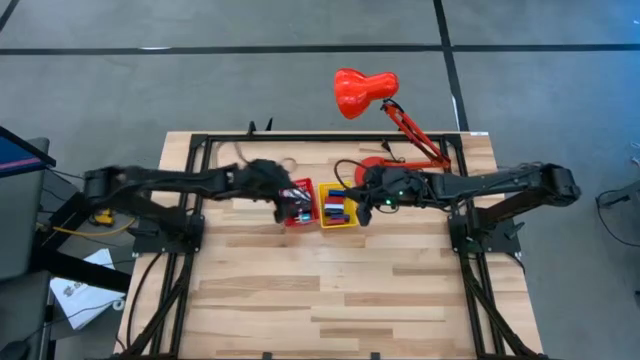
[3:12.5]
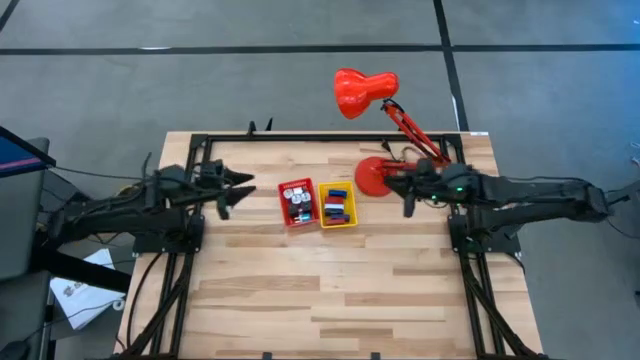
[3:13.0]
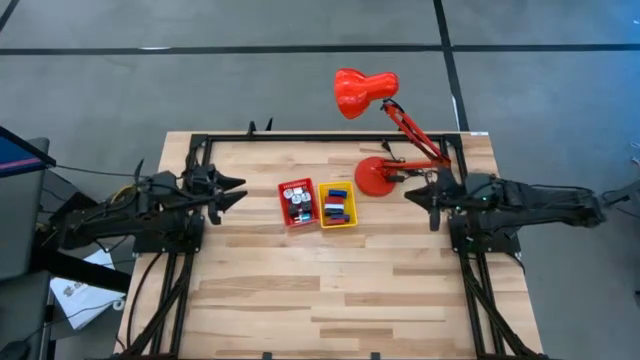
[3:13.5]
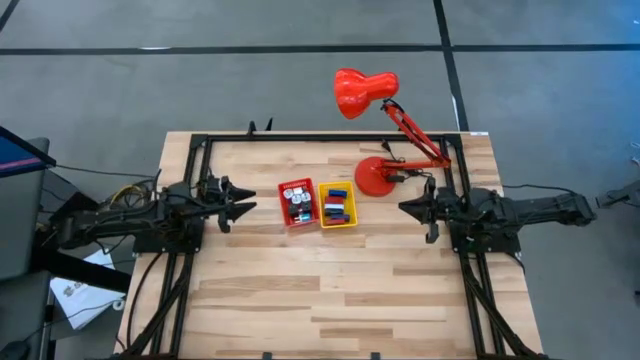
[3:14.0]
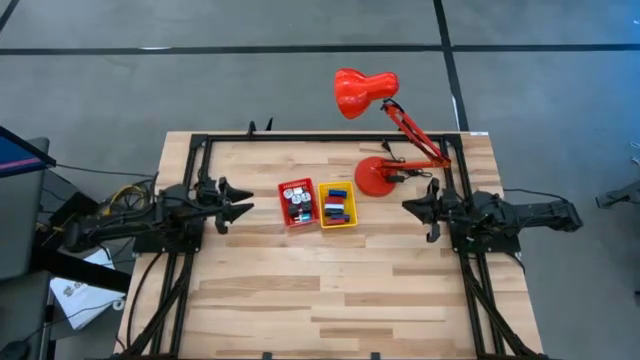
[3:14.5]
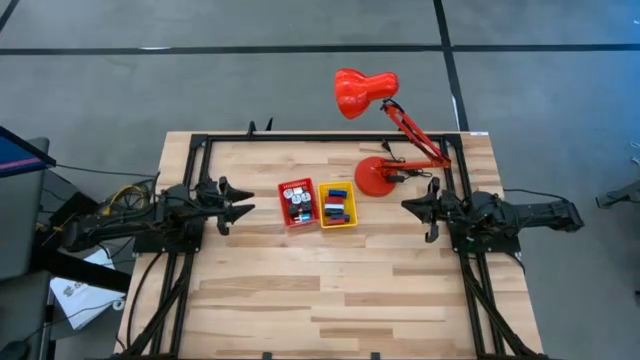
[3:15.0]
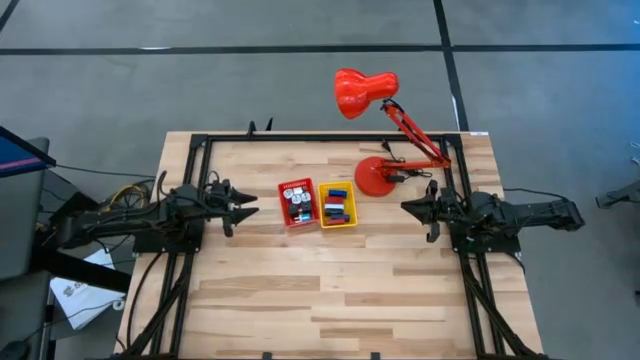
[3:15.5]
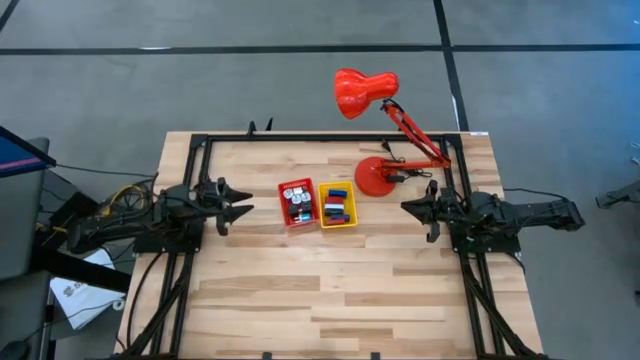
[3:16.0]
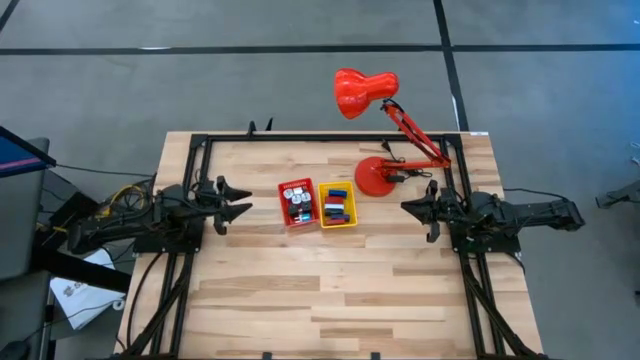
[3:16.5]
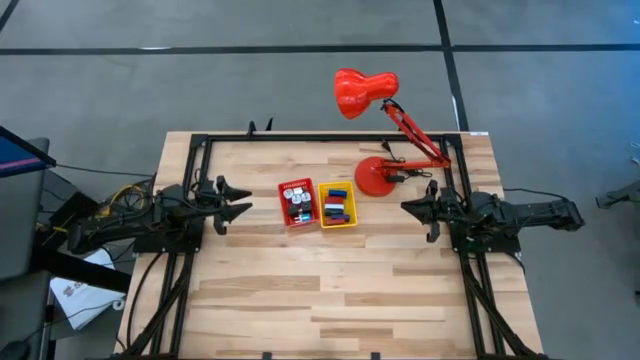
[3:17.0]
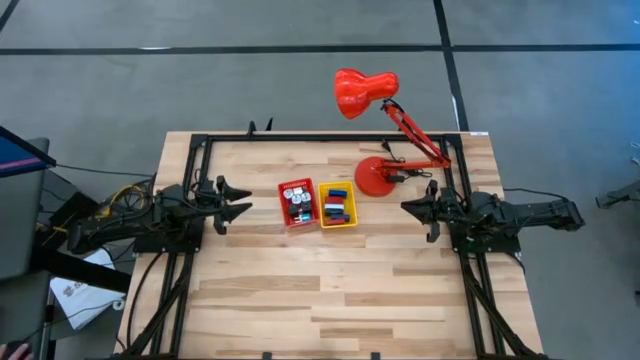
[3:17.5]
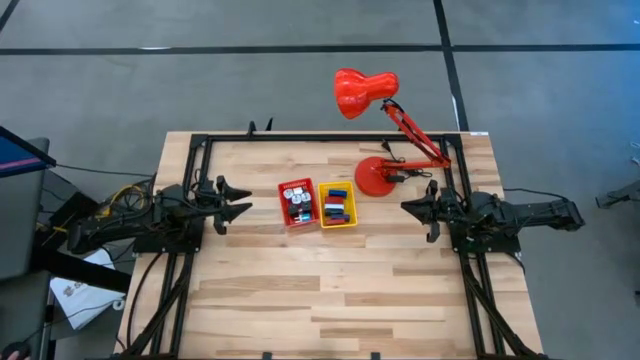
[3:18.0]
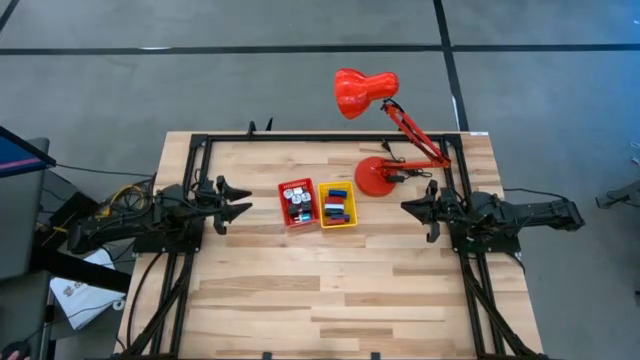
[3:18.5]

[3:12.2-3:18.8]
Task: Pick & Place Office items
Return to Home Position

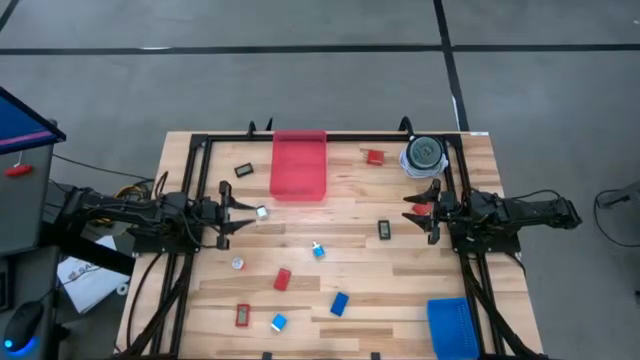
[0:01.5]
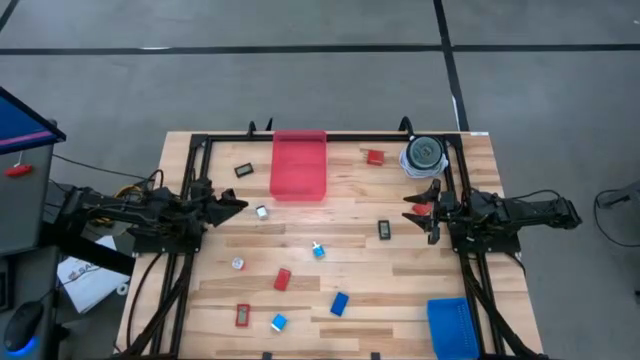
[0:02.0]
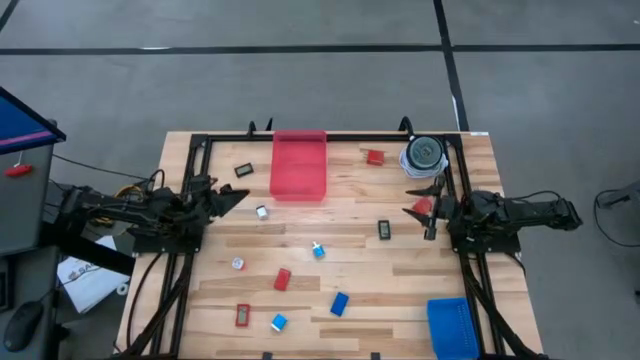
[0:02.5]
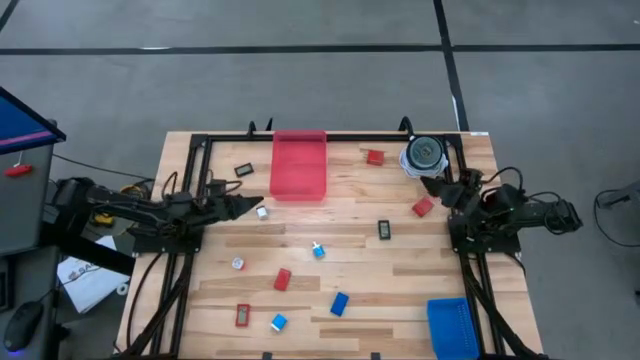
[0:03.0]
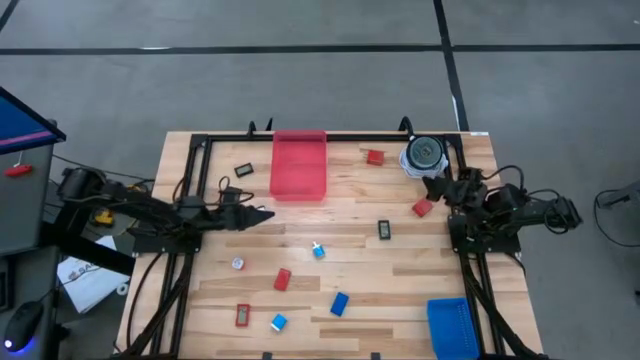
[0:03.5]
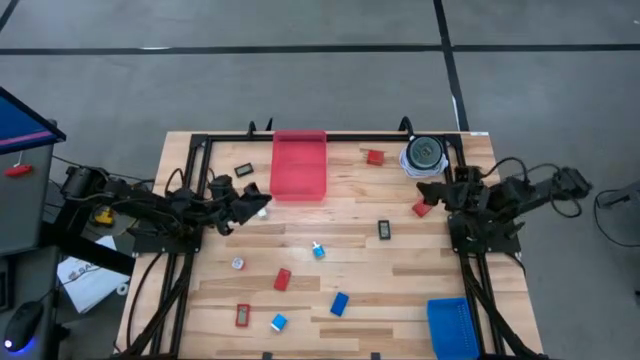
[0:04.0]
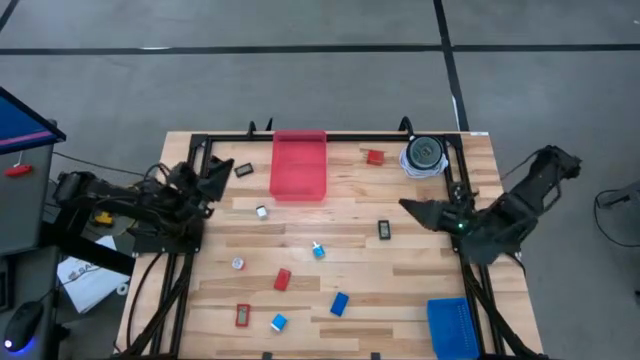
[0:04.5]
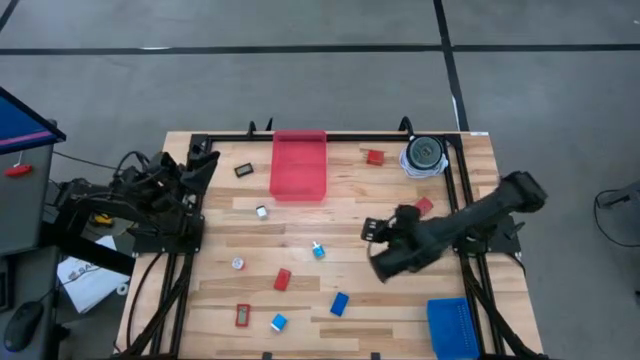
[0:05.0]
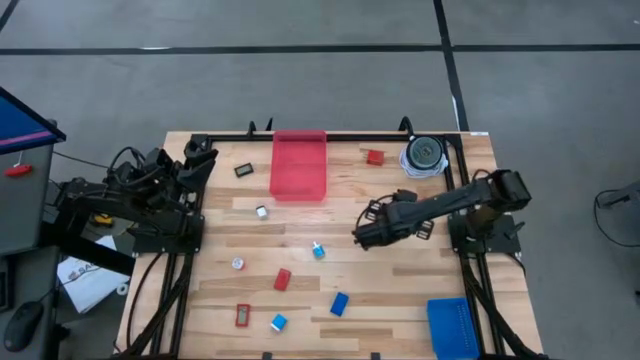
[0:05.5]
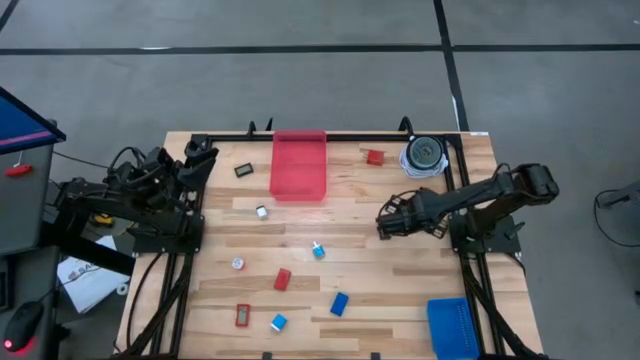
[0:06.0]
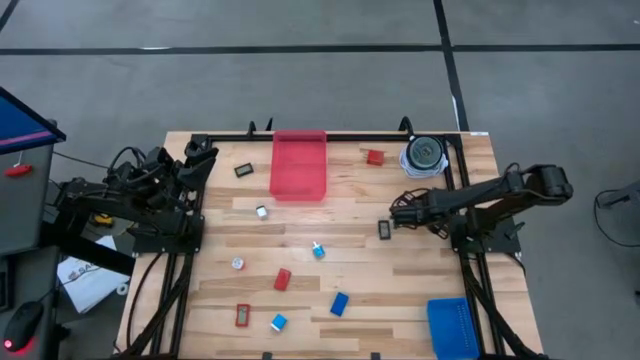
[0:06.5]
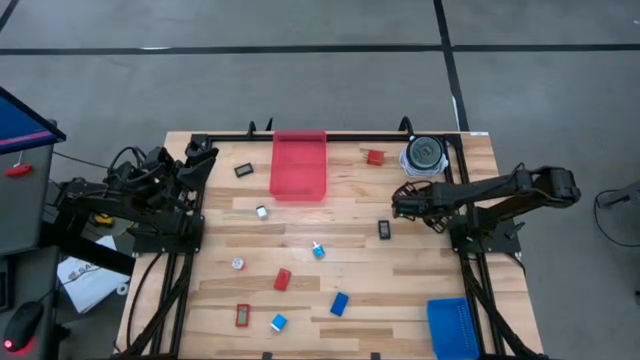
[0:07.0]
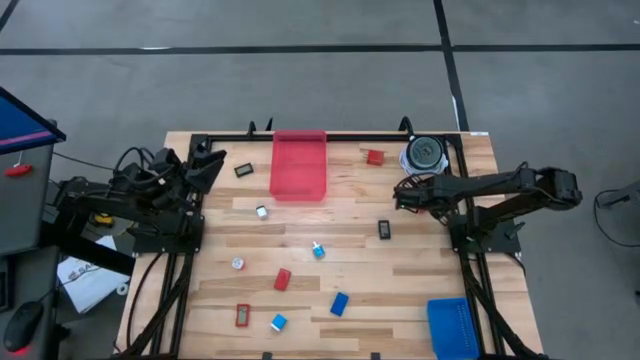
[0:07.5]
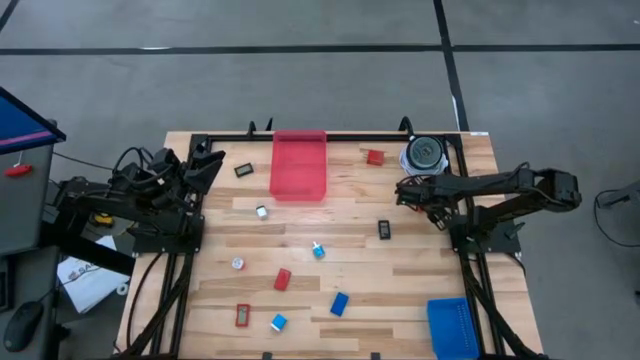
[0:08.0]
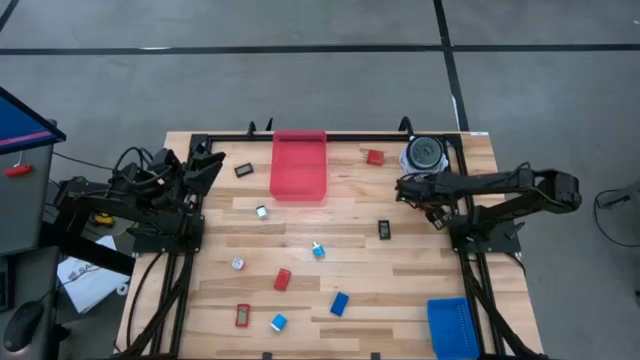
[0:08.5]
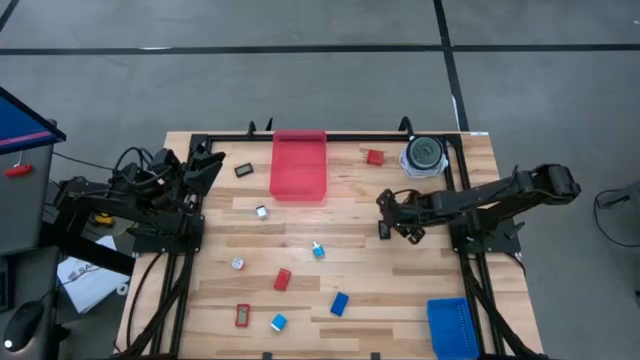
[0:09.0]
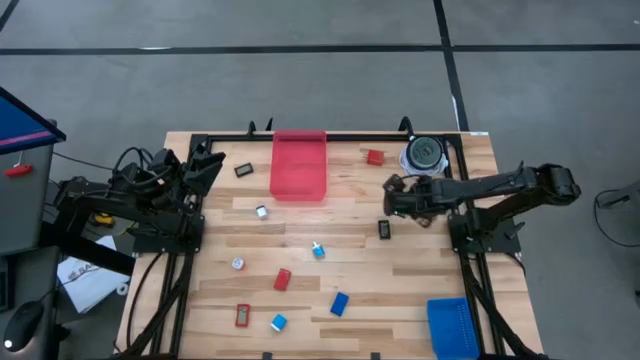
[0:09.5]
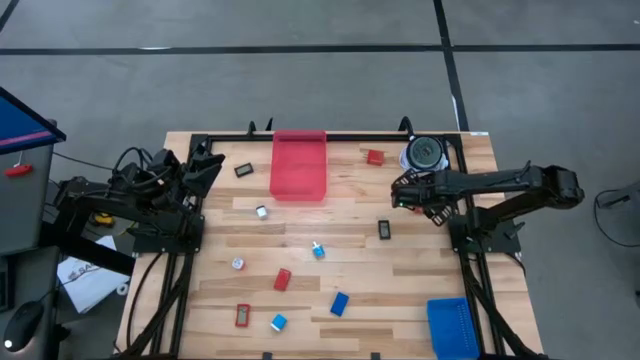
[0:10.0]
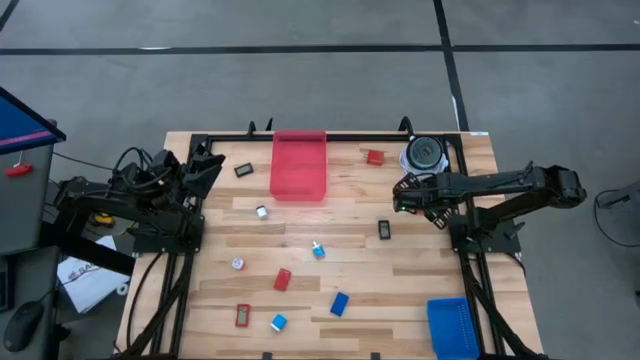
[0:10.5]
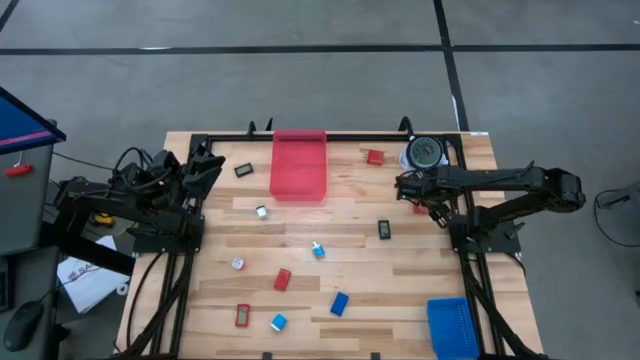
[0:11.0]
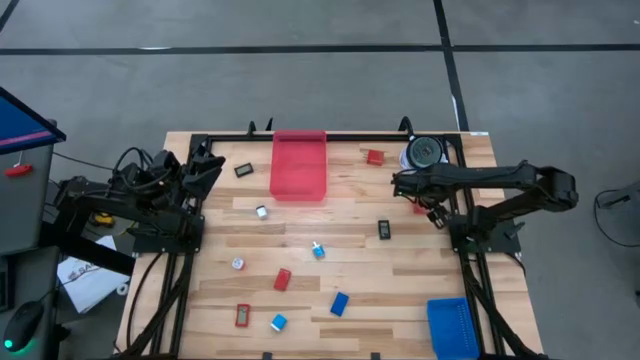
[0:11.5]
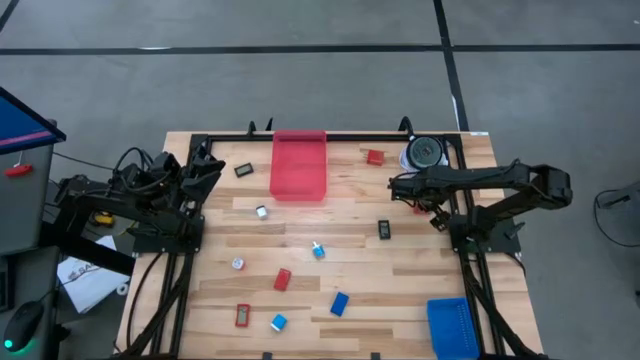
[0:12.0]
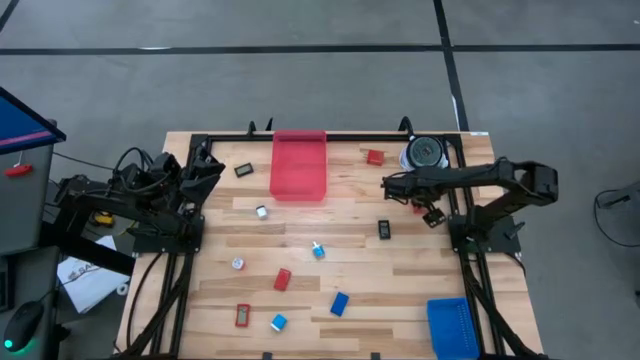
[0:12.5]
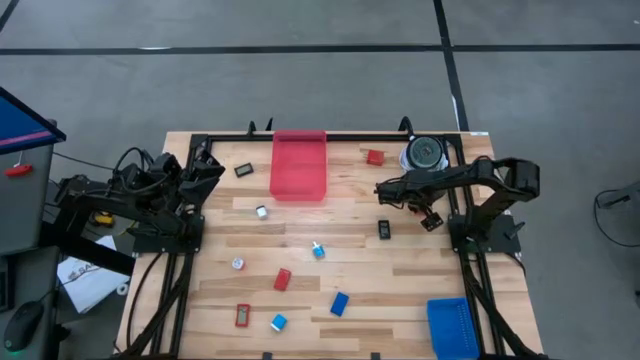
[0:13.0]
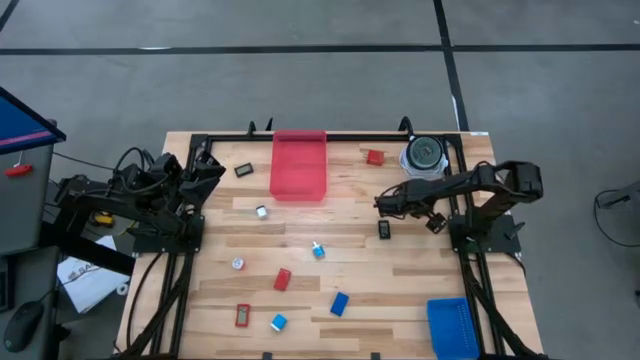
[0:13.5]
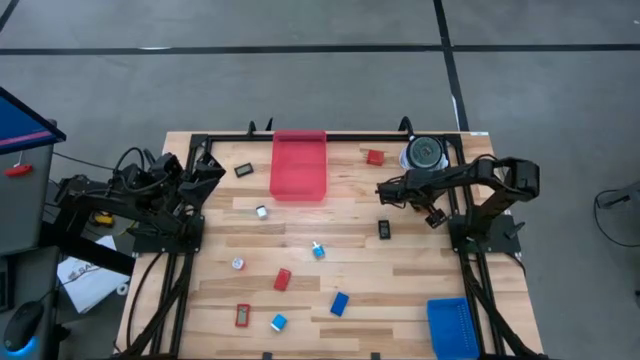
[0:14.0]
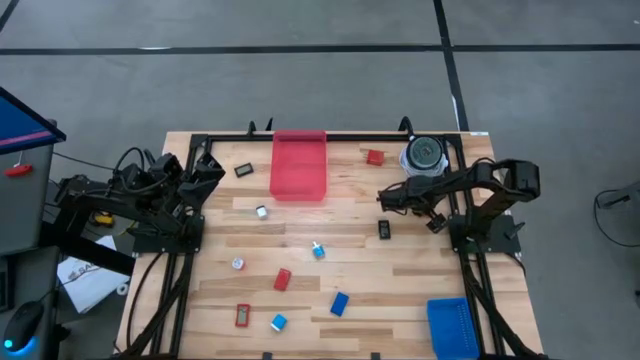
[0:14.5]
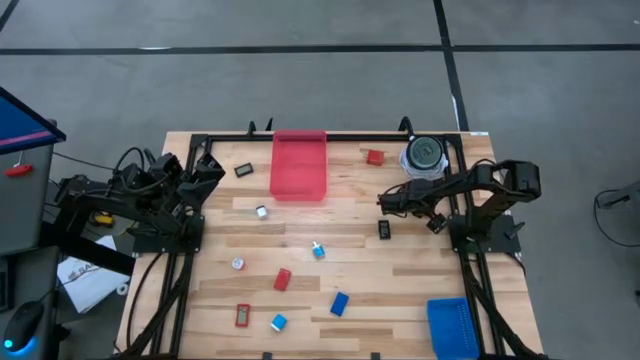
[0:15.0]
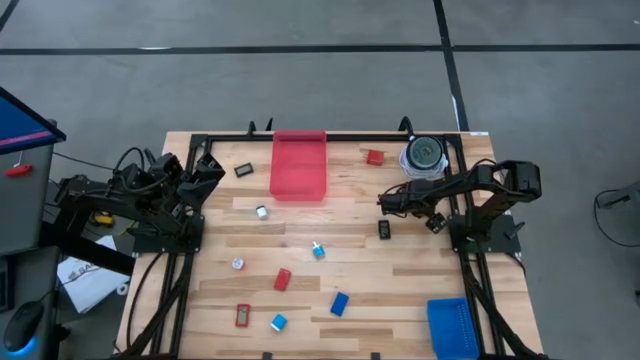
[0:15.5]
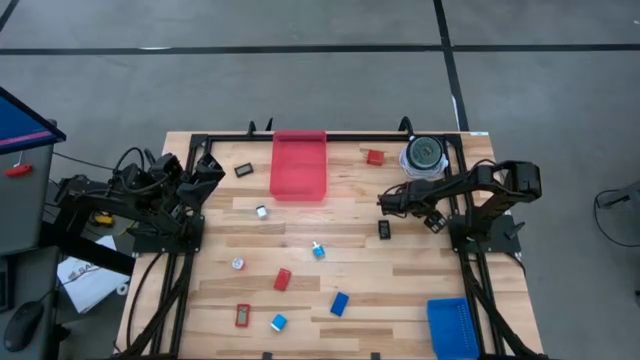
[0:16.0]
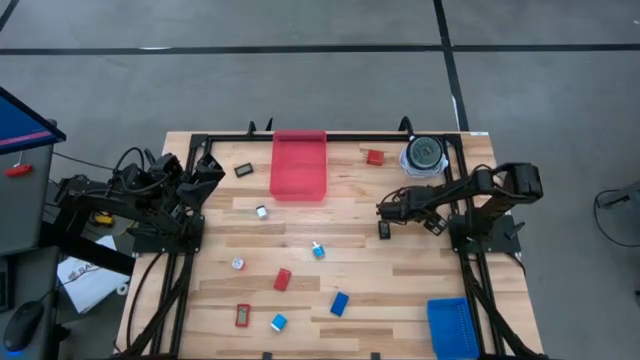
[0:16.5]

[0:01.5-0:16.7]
Task: Pick & Place Office items
Put the bottom red charger adapter into the red bin
